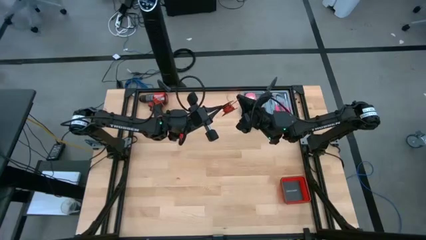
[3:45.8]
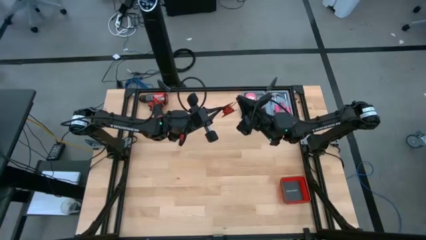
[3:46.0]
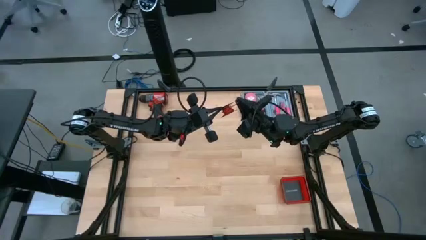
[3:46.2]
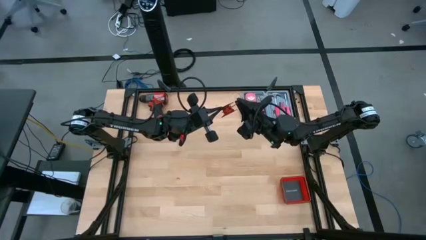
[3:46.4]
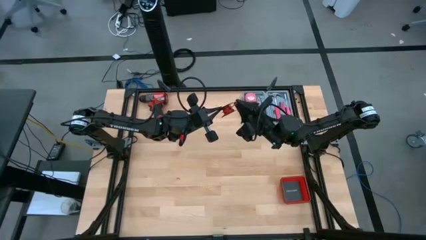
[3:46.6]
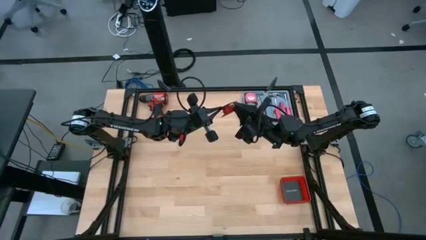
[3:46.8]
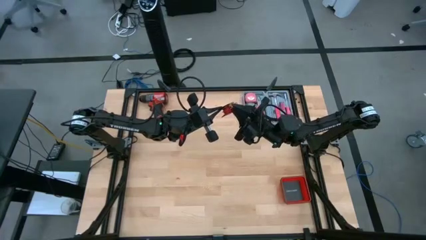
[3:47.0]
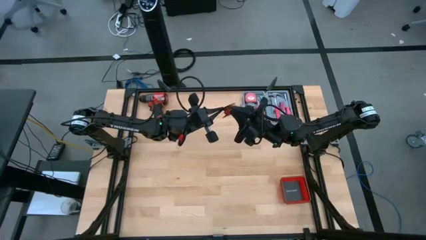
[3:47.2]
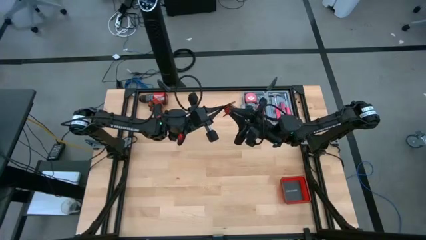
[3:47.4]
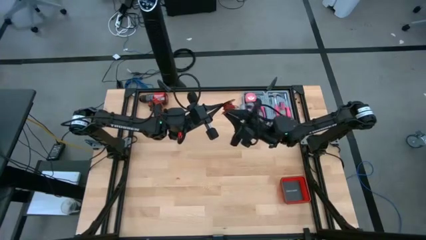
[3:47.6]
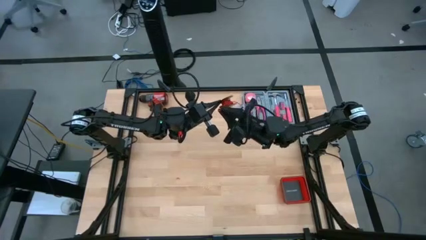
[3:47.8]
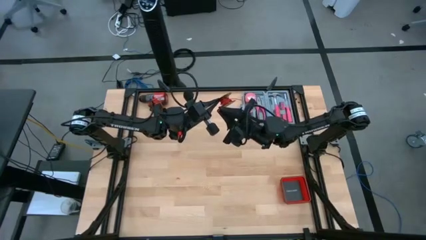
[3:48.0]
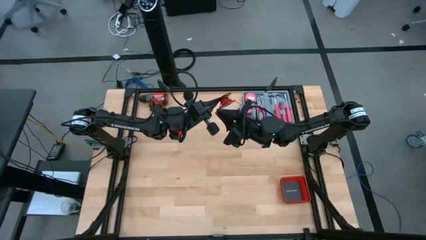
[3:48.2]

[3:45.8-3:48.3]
Task: Coil cords
Coil the red wire on the black spool

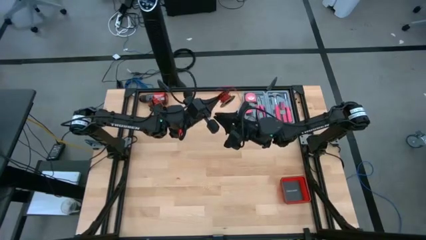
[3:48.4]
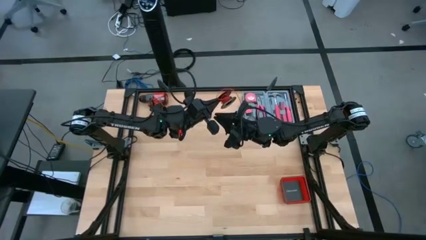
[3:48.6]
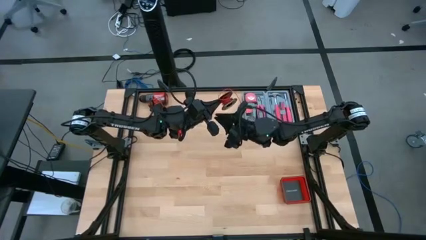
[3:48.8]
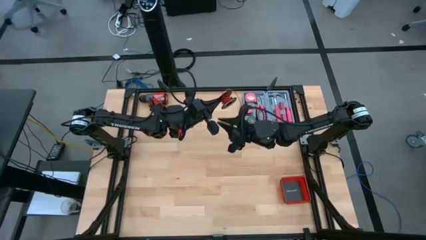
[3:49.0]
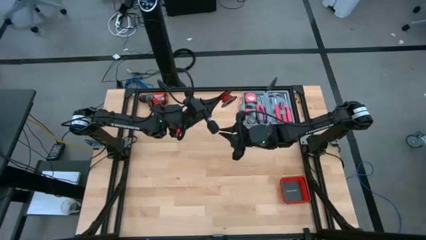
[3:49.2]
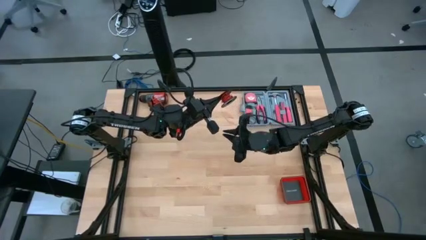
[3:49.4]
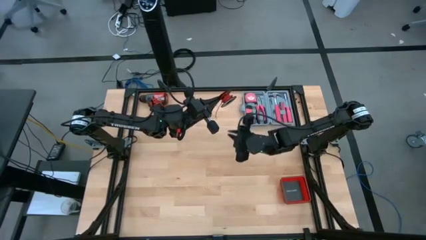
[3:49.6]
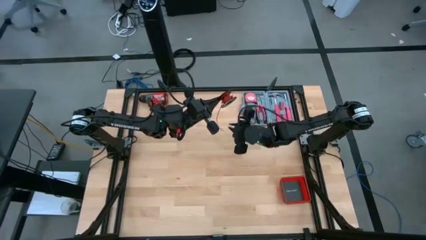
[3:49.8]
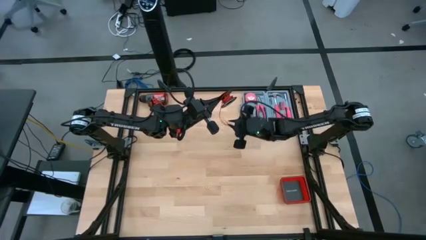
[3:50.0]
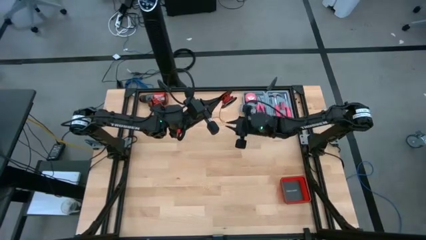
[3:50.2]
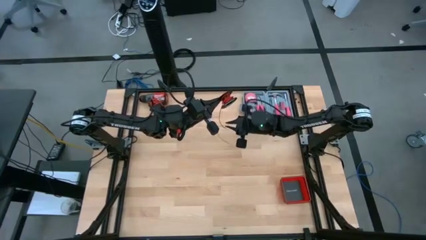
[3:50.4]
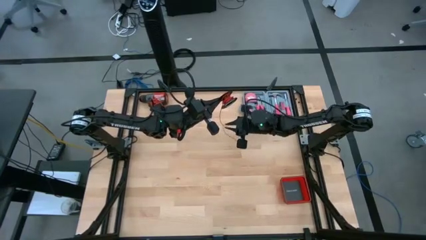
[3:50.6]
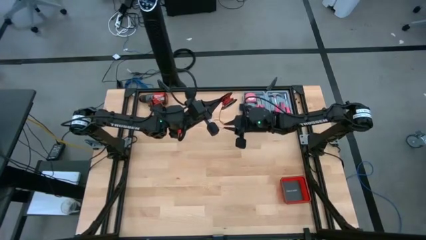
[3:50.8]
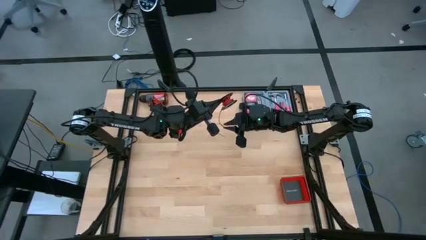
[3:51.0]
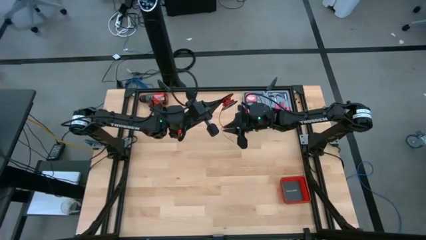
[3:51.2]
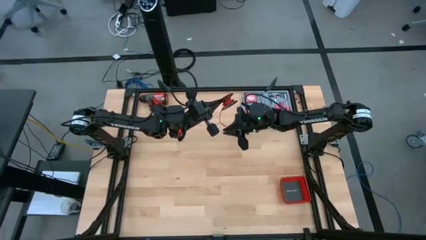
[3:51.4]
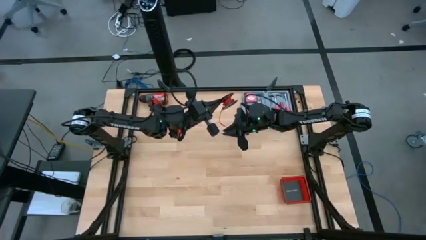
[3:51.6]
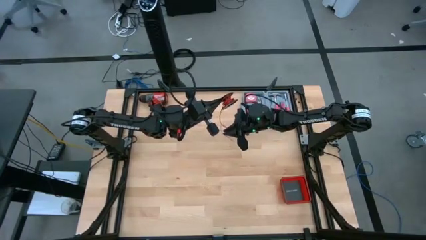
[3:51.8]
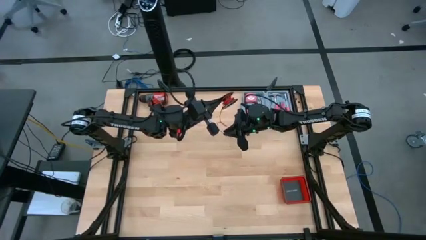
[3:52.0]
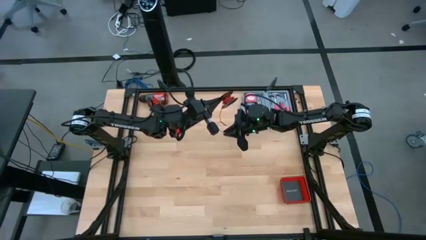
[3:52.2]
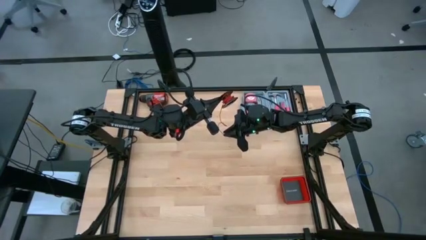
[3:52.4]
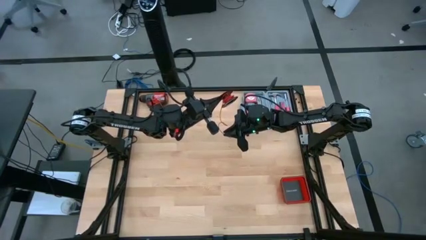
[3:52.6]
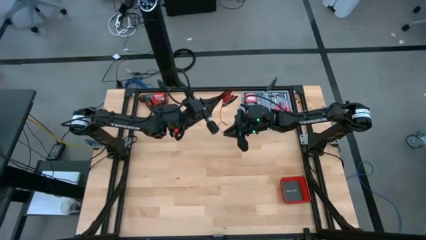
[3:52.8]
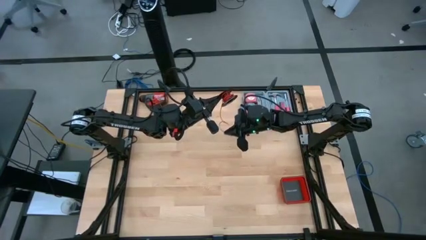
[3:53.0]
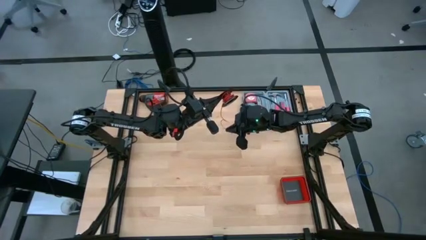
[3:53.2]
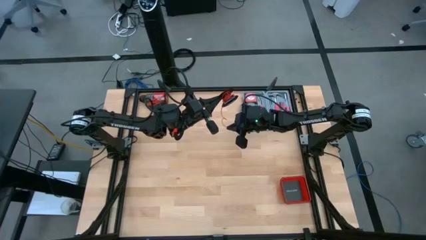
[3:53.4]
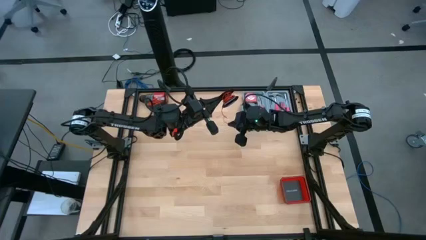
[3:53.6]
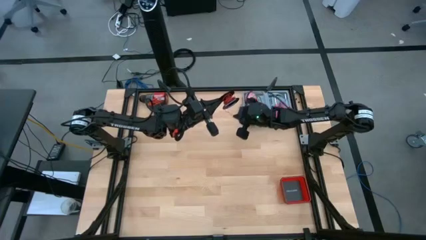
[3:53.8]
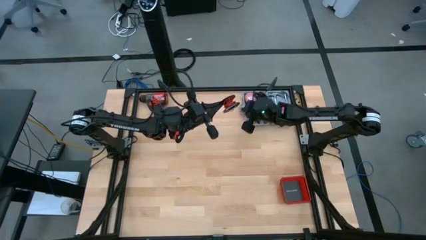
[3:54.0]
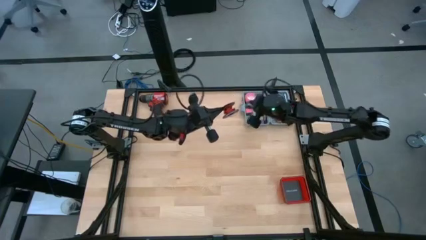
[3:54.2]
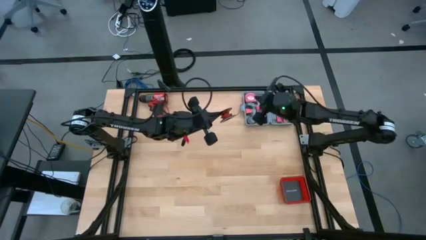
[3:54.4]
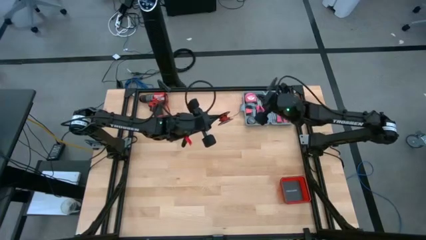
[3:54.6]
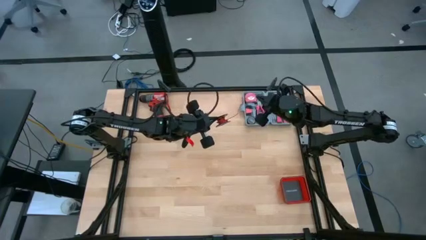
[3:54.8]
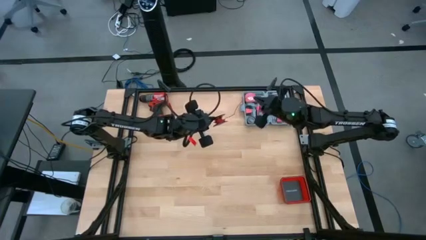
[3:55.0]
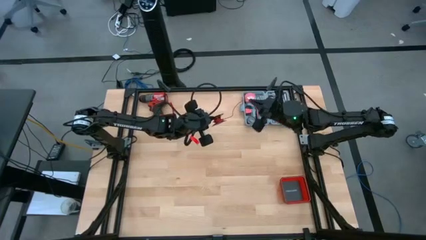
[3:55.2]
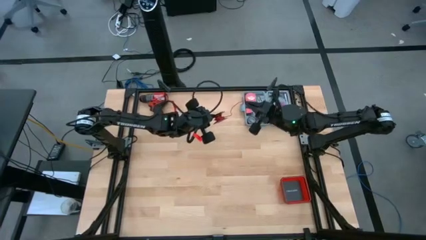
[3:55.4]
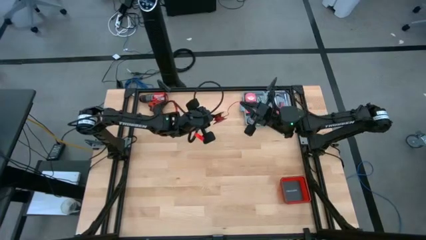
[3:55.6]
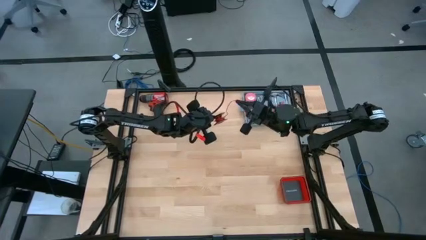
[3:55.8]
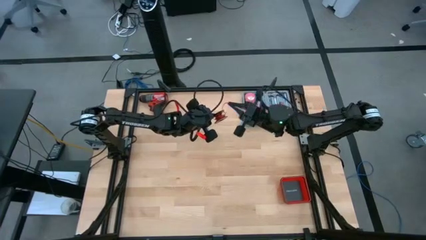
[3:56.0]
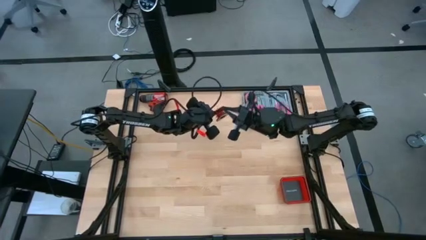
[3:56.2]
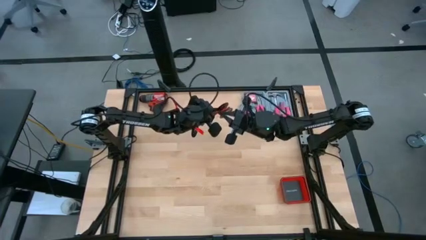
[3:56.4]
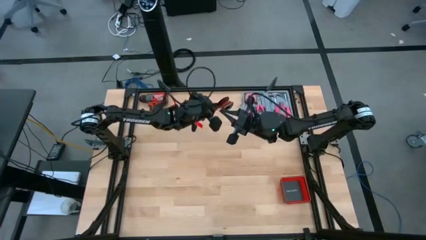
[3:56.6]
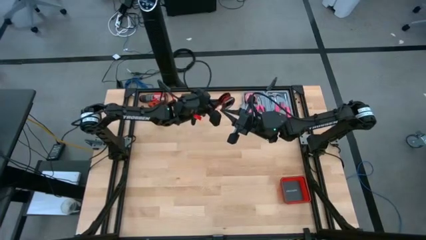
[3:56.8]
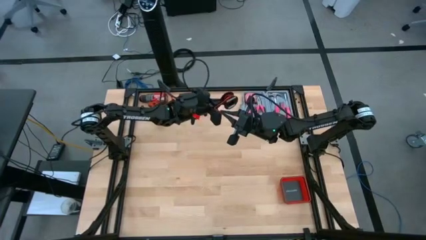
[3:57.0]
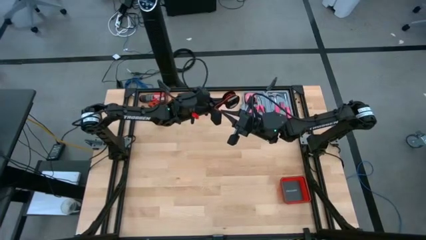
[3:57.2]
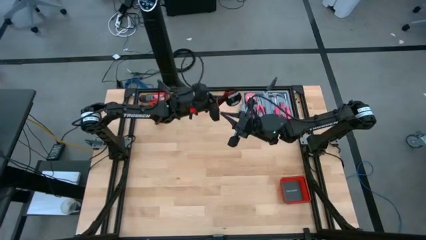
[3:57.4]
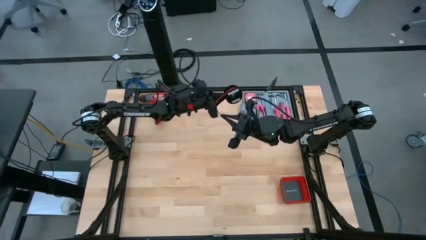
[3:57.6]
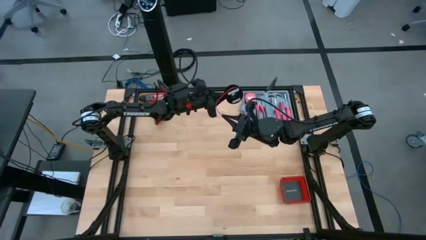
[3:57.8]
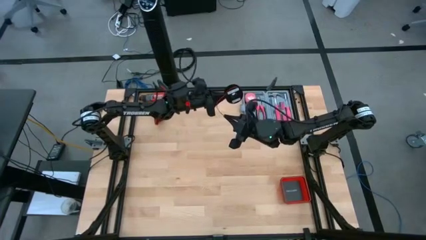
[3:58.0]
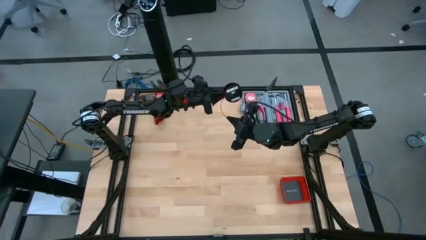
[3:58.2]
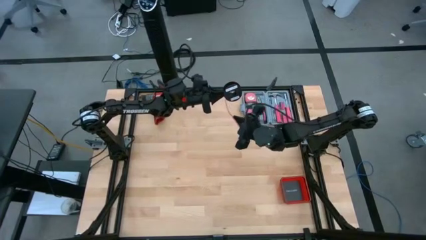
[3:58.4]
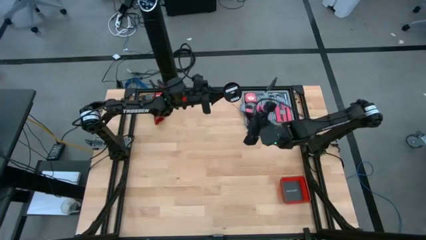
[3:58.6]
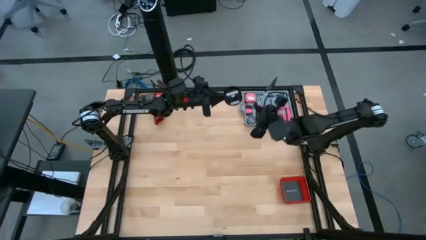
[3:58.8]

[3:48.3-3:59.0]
Coil the red wire on the black spool

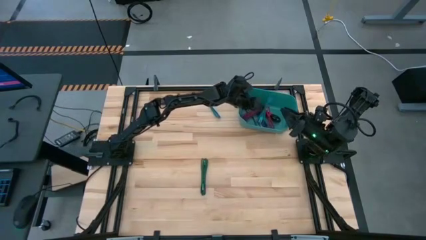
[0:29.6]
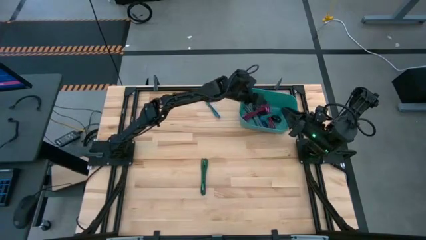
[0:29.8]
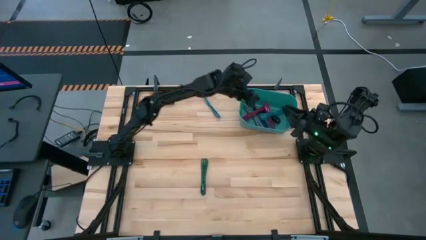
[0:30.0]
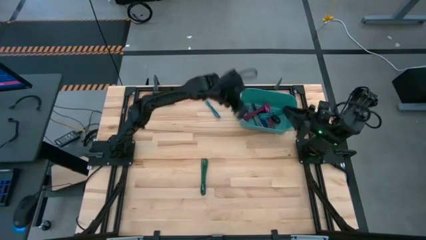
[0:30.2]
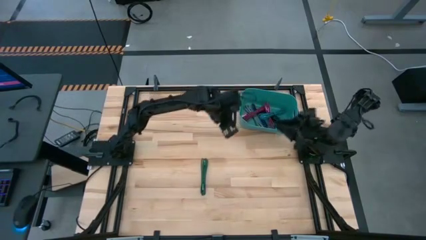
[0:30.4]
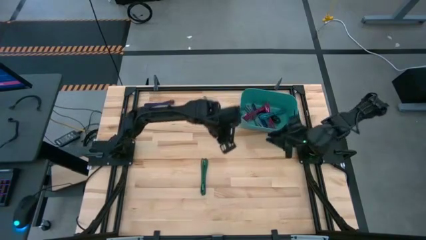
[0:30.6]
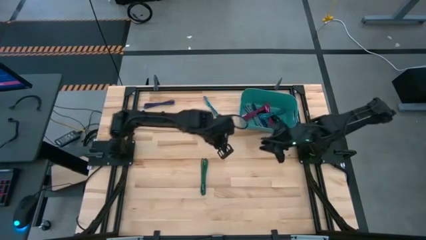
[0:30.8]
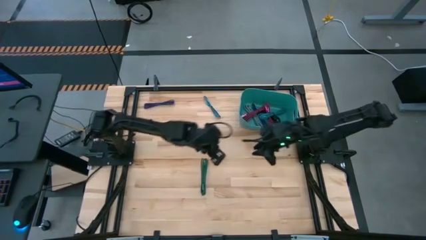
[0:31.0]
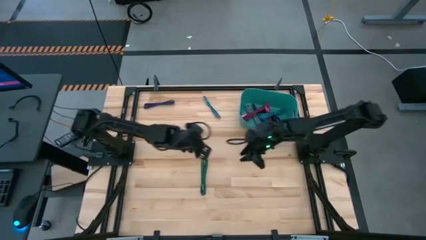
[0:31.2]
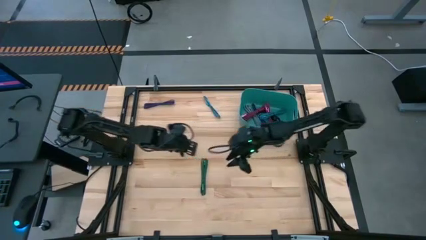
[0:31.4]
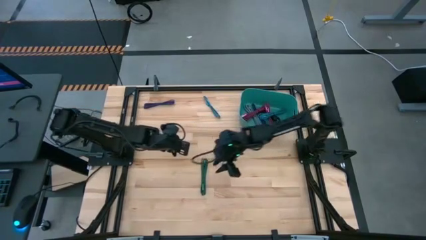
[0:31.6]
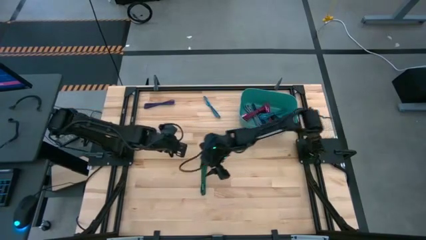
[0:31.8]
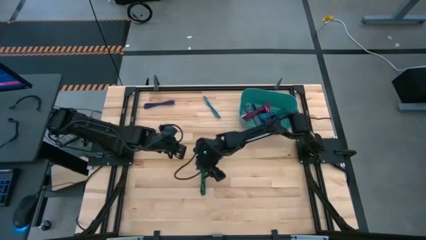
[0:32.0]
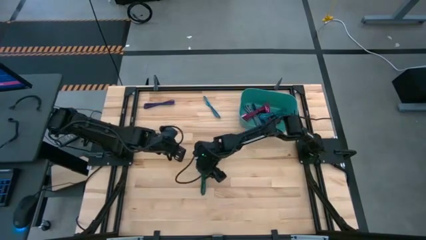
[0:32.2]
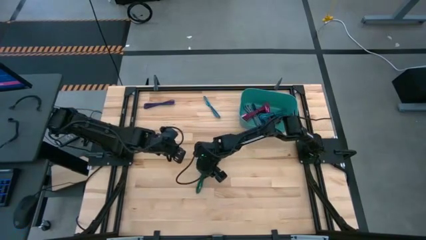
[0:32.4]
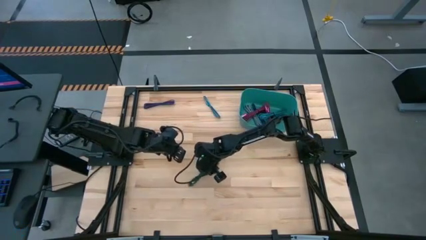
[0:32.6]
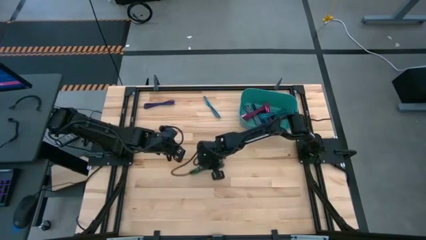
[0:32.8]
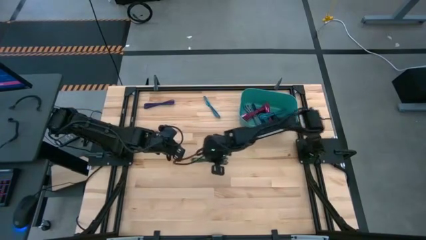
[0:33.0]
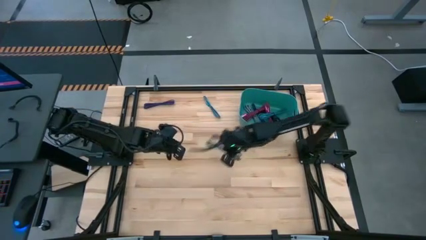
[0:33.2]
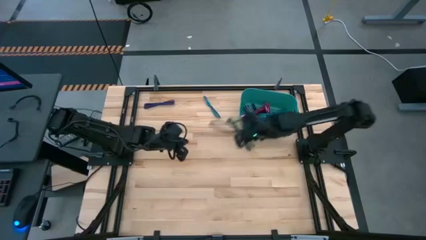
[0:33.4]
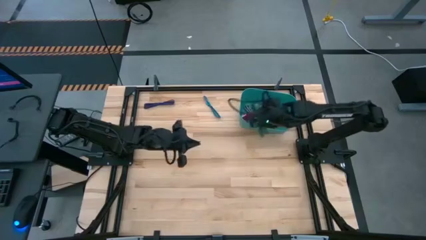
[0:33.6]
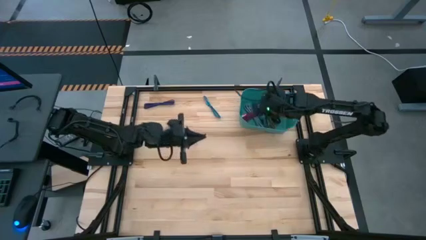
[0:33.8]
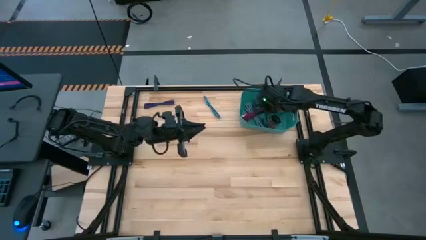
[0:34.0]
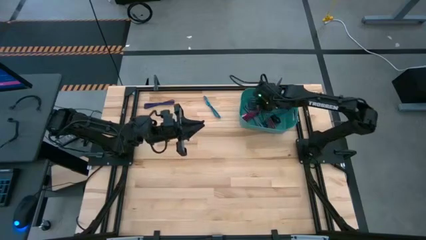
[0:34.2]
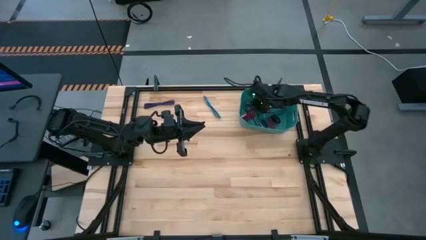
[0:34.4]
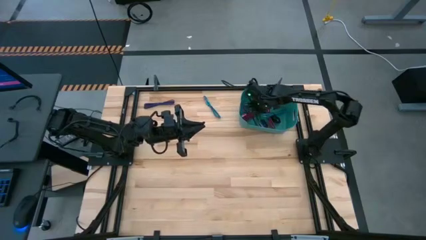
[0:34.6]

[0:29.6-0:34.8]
Task: Pick and place USB-C Cables
Put the green charger cable into the light blue bin
